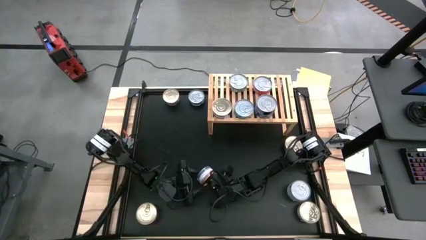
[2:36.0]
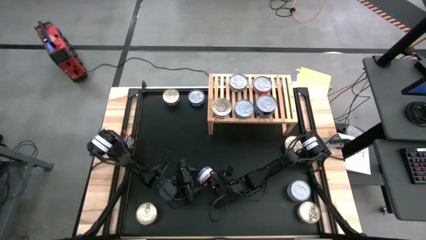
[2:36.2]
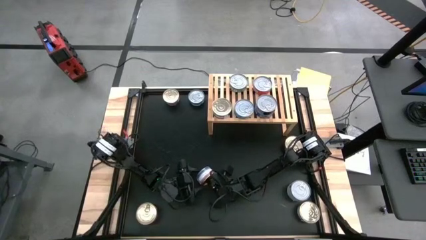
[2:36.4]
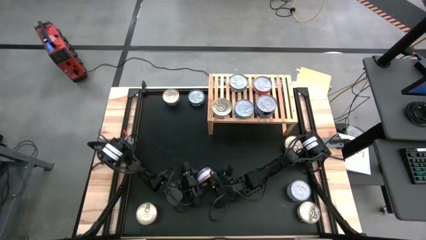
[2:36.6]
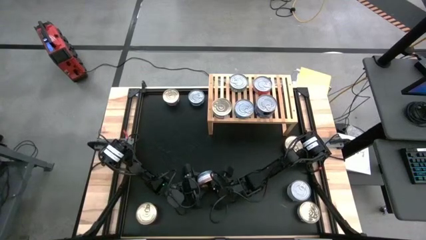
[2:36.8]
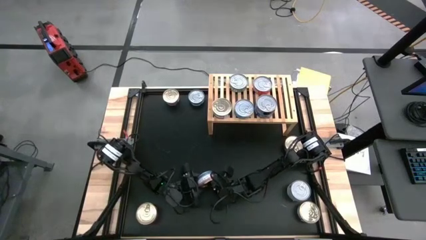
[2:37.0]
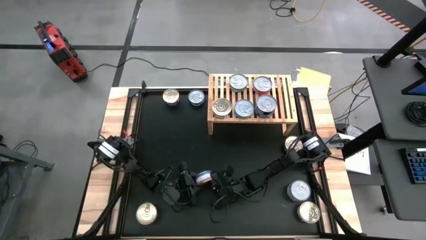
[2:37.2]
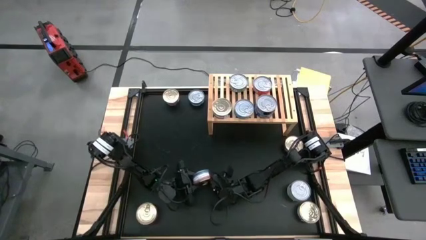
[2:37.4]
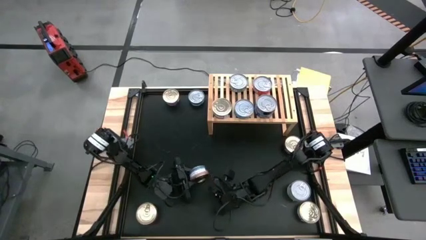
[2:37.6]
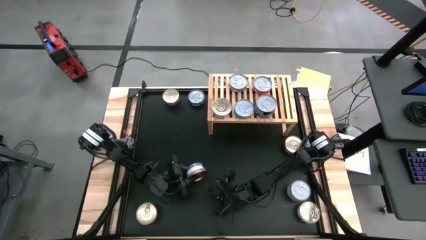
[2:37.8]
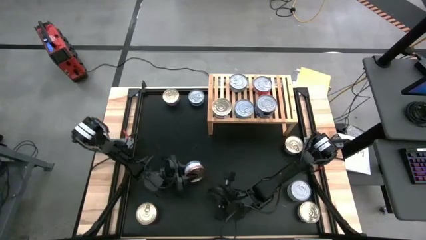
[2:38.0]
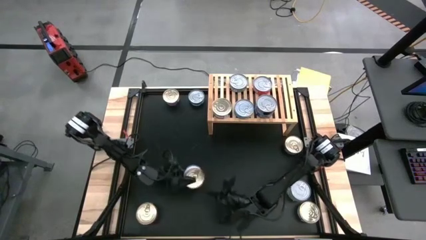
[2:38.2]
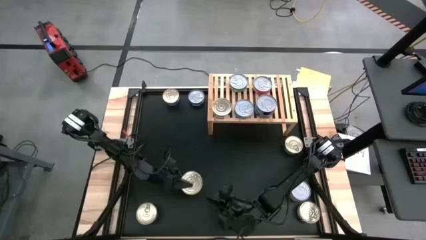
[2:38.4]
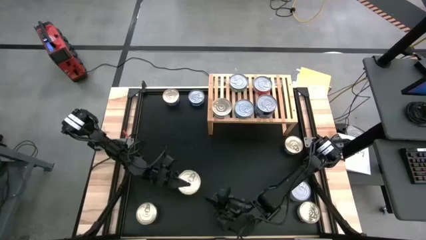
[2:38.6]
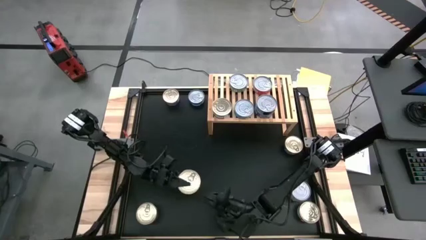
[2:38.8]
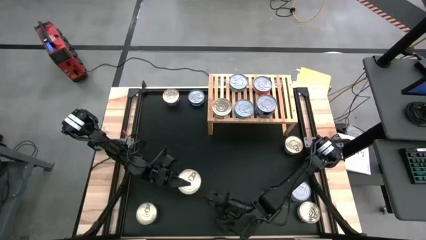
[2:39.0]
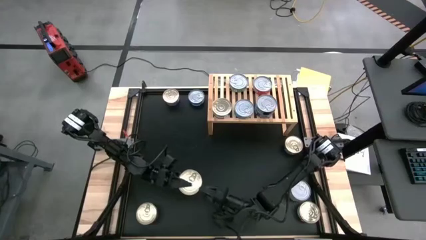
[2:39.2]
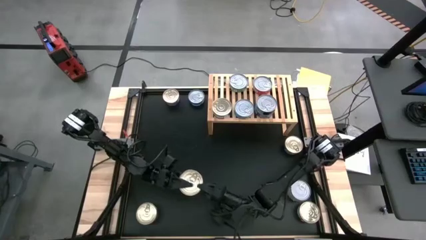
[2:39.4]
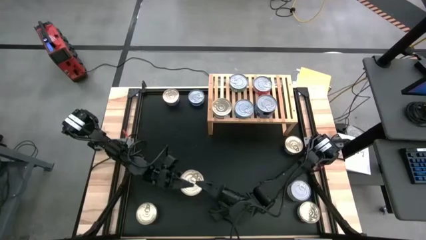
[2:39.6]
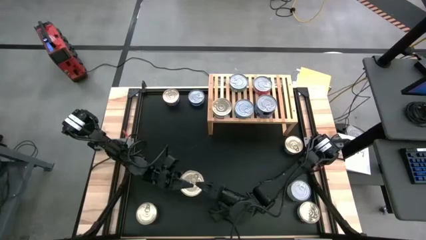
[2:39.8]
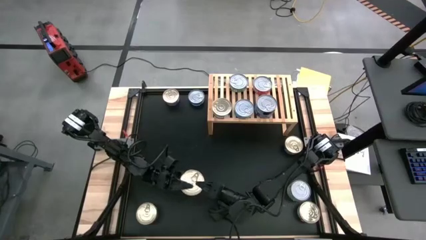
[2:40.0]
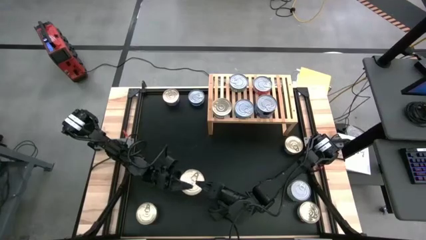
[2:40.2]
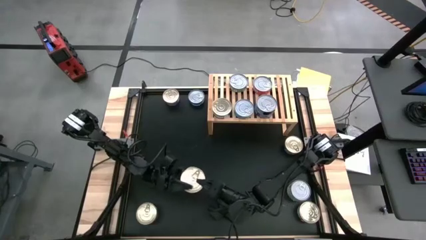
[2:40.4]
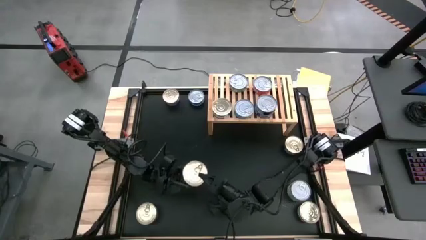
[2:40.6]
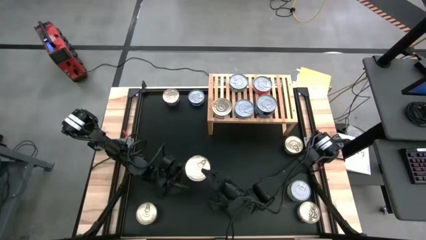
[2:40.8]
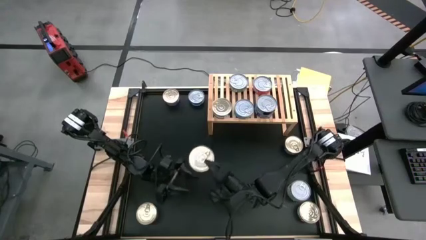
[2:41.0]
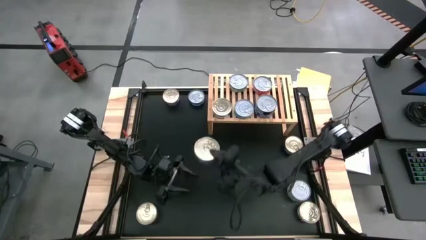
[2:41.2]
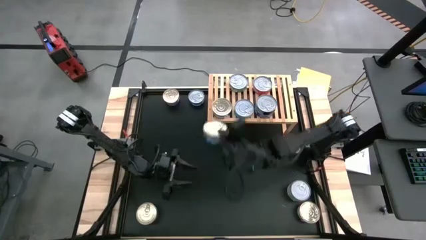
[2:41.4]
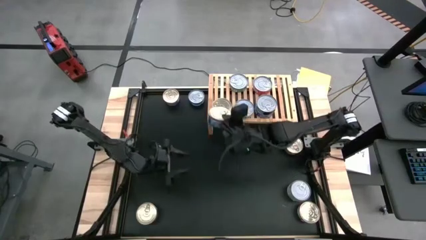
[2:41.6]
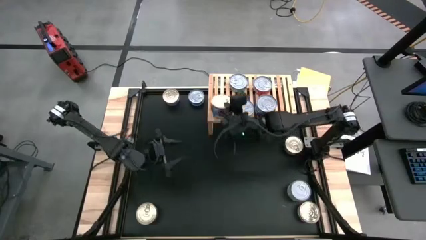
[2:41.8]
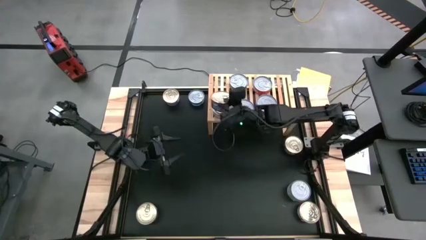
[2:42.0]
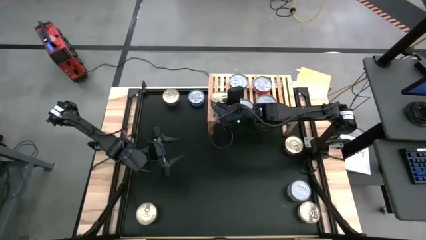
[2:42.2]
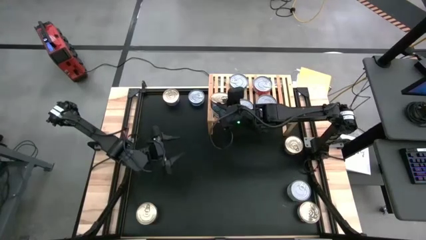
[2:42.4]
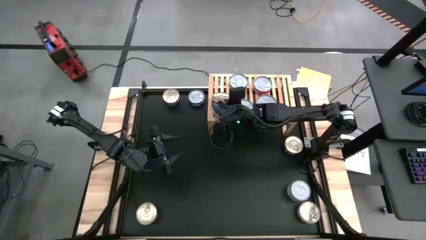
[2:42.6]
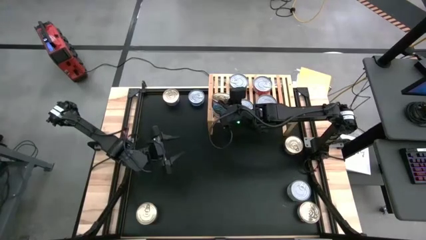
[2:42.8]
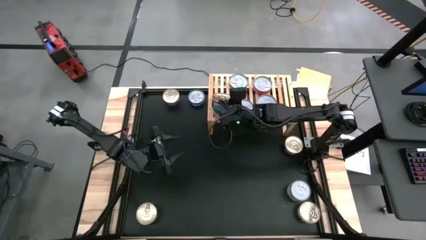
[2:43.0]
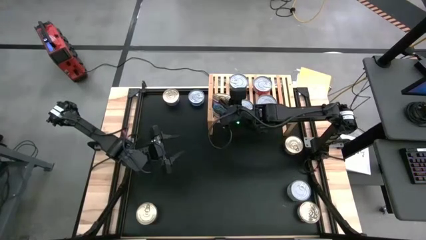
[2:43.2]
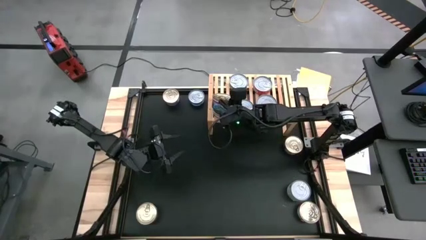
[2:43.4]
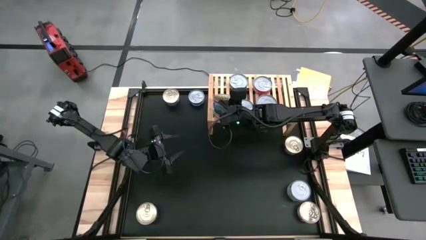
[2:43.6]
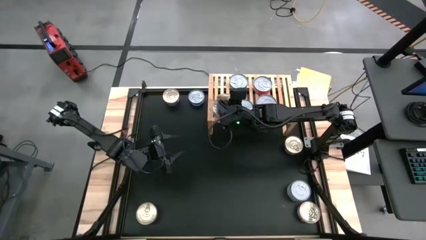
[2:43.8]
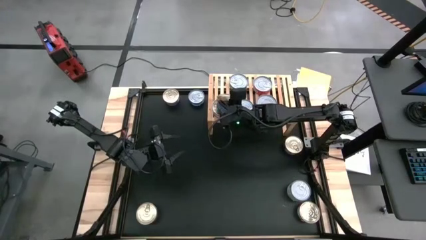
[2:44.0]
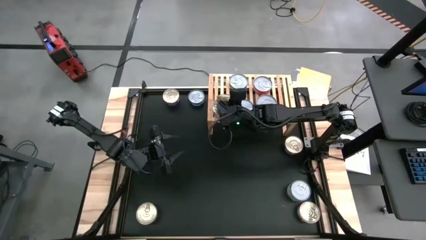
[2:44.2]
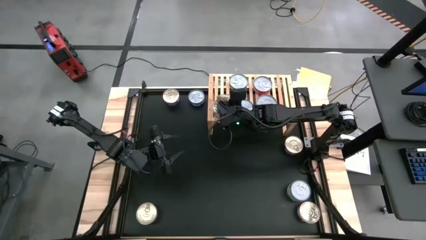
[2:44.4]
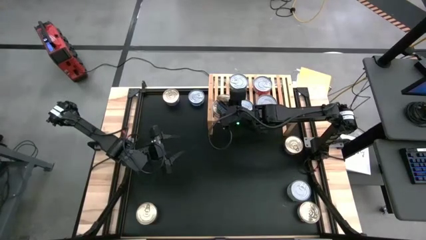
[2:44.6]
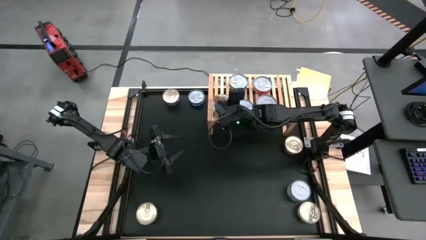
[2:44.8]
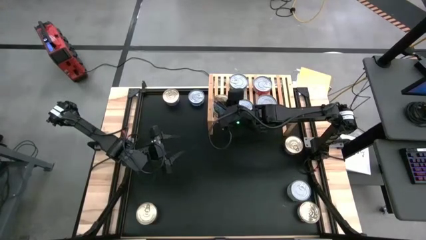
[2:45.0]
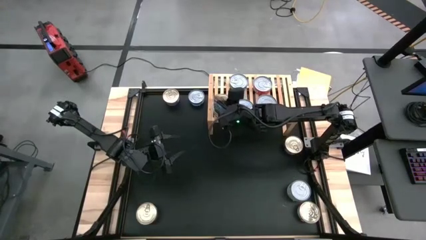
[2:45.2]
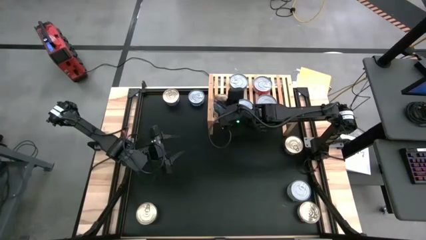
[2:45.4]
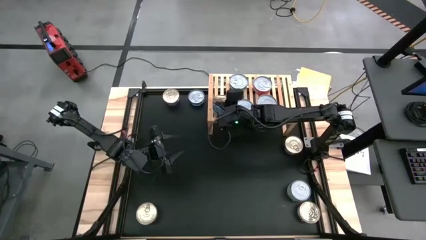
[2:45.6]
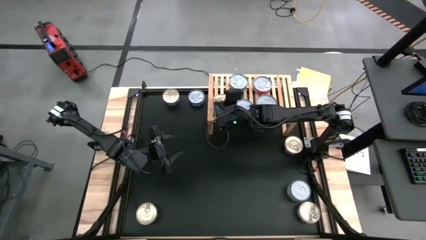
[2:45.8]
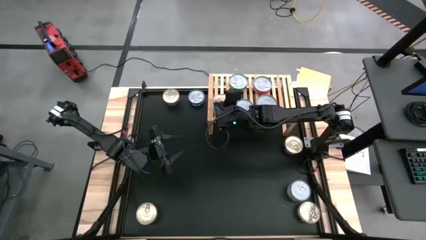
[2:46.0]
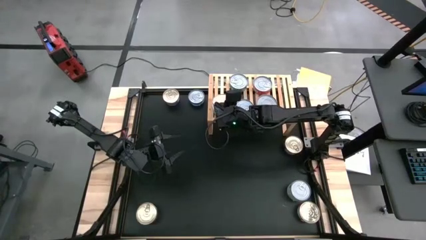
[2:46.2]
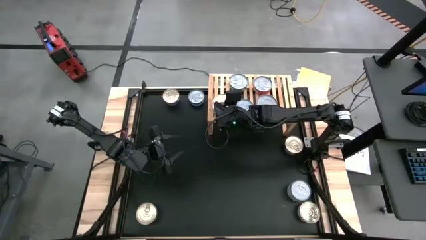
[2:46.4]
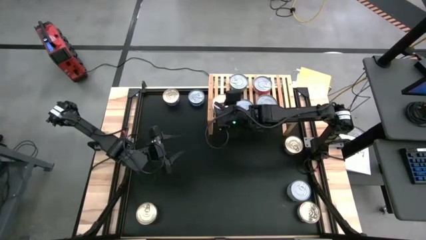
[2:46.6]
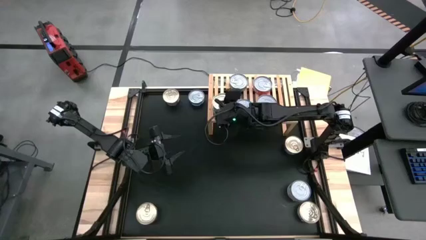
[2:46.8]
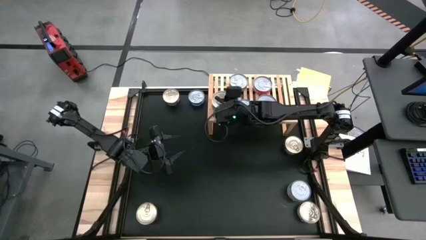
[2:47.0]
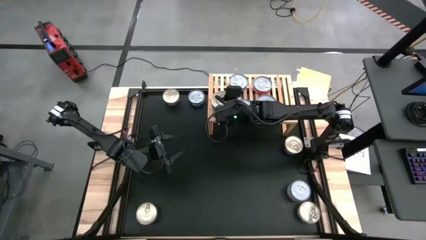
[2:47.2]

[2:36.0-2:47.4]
Task: Stack canned seafood by type on shelf
Stack the blue-pink tuna can on top of the blue-pink tuna can on the shelf
